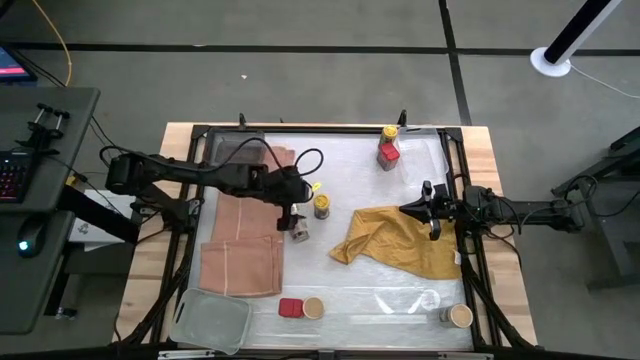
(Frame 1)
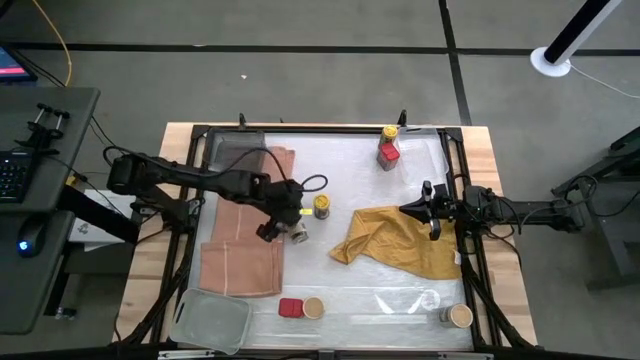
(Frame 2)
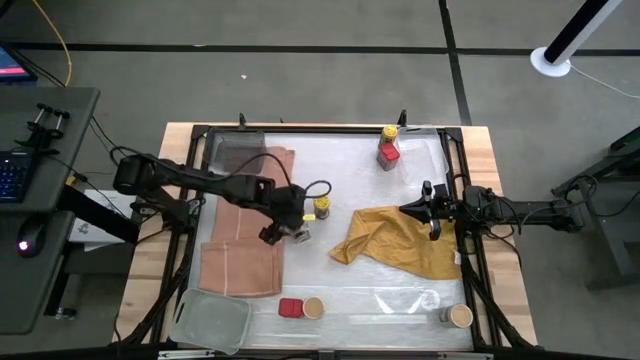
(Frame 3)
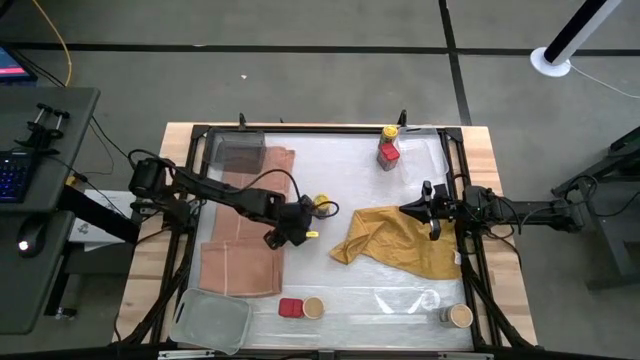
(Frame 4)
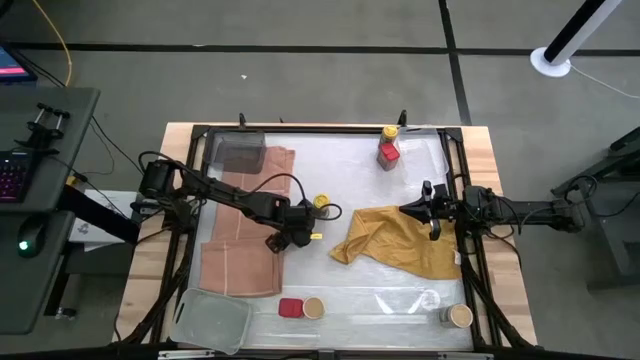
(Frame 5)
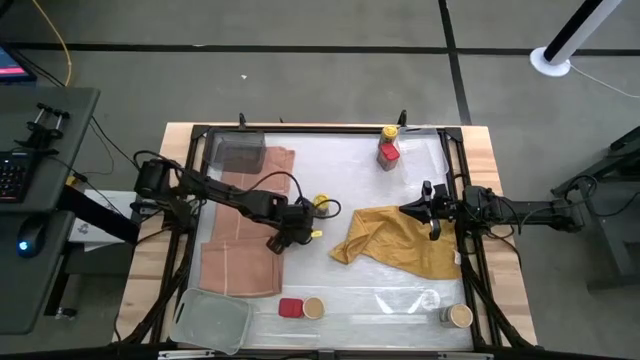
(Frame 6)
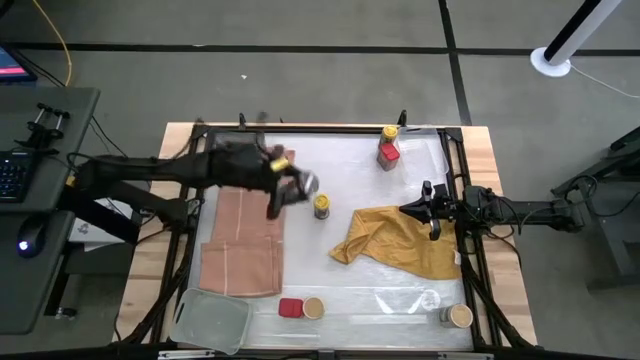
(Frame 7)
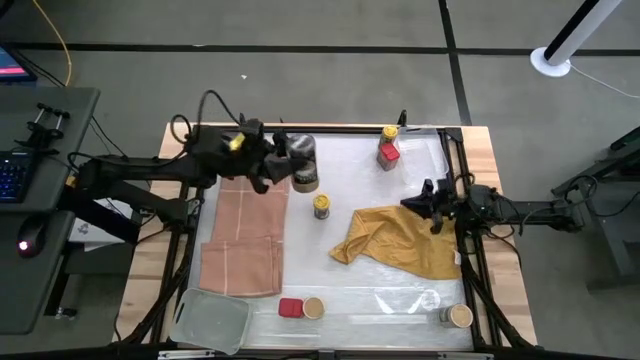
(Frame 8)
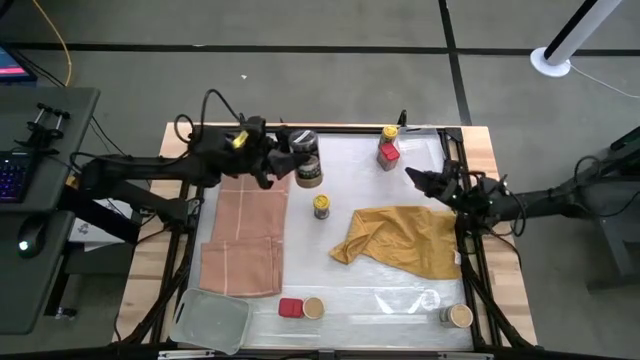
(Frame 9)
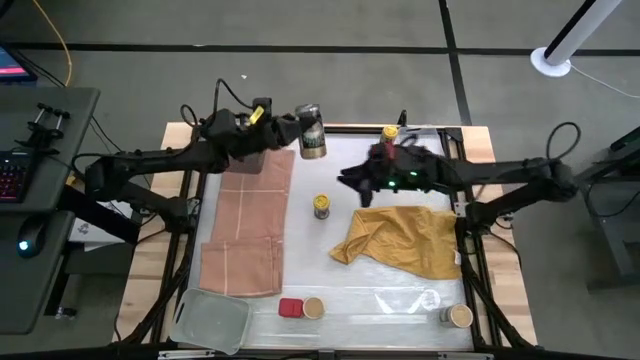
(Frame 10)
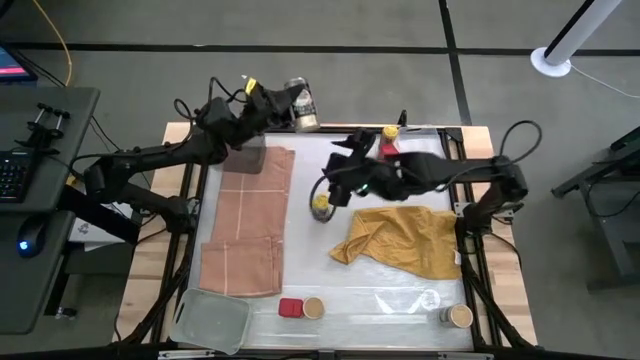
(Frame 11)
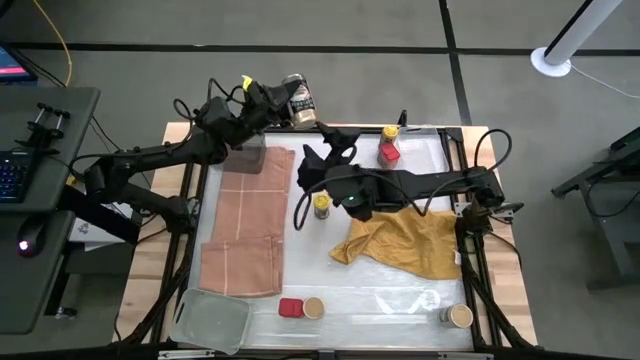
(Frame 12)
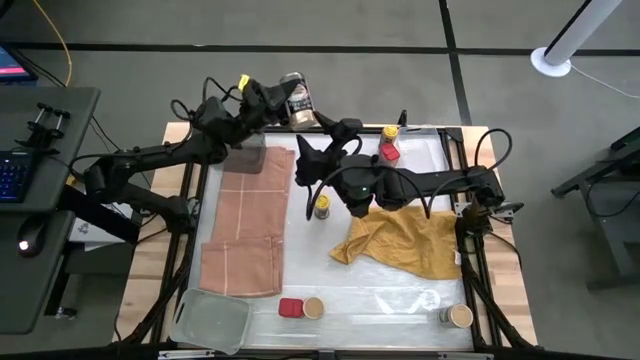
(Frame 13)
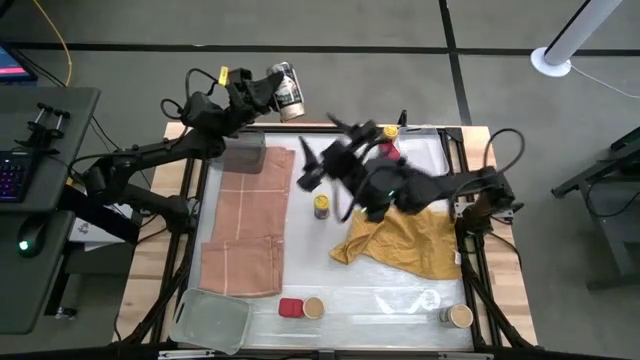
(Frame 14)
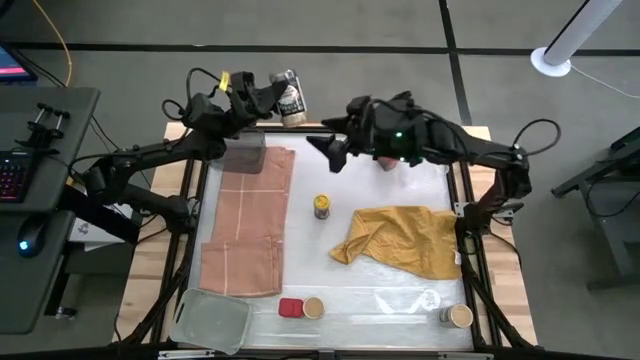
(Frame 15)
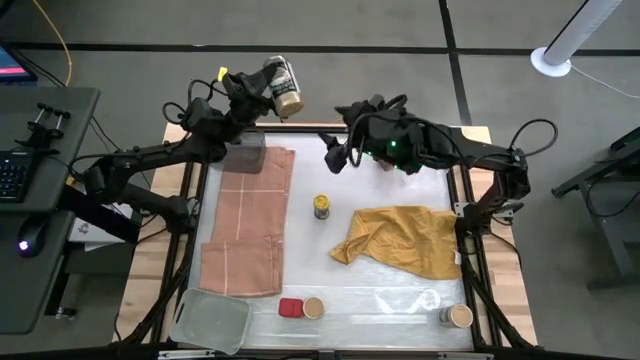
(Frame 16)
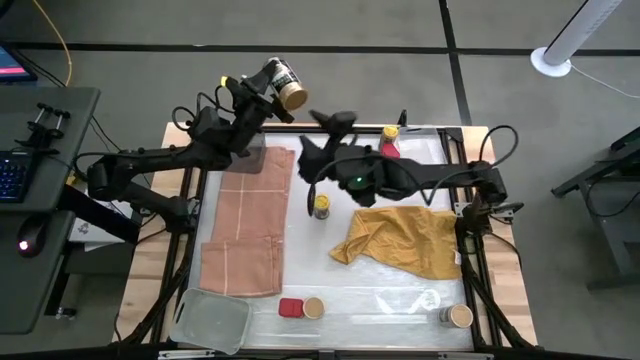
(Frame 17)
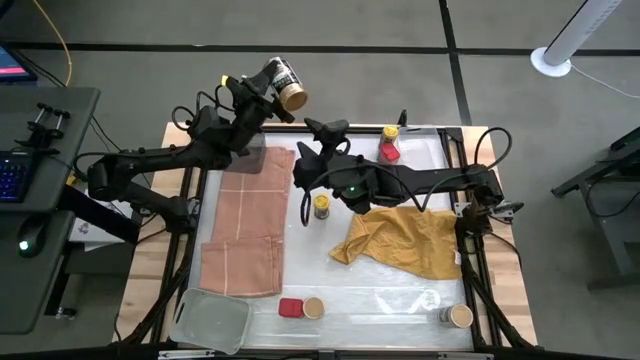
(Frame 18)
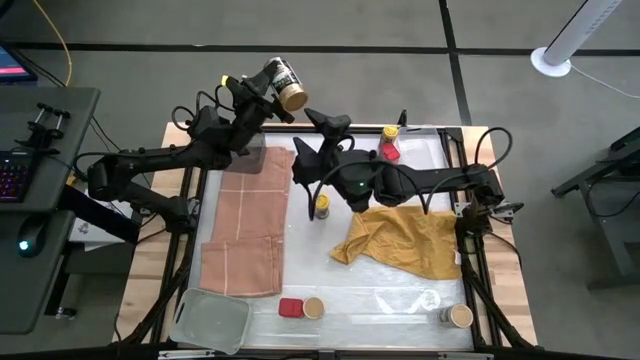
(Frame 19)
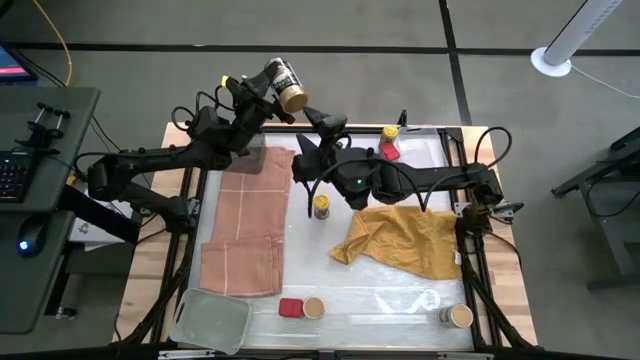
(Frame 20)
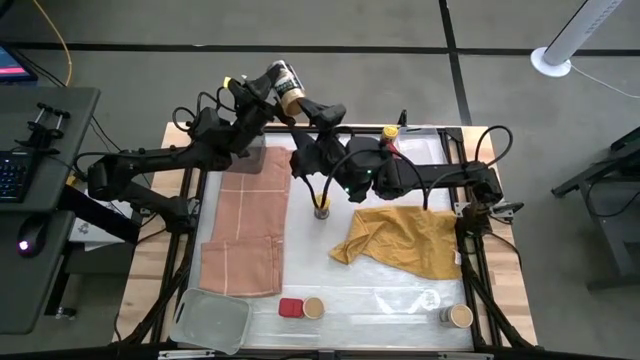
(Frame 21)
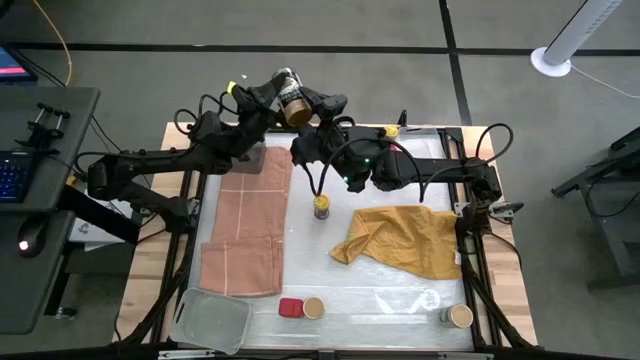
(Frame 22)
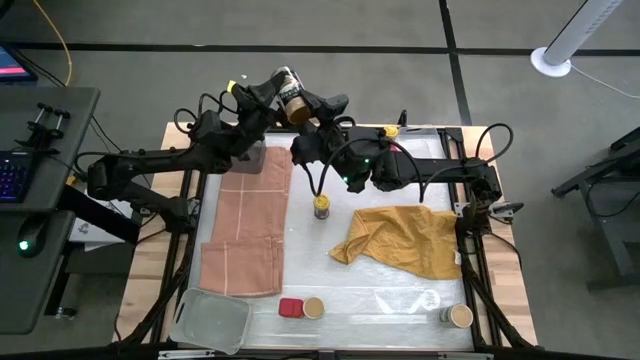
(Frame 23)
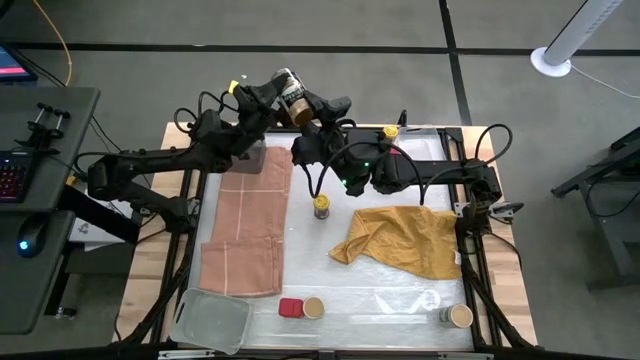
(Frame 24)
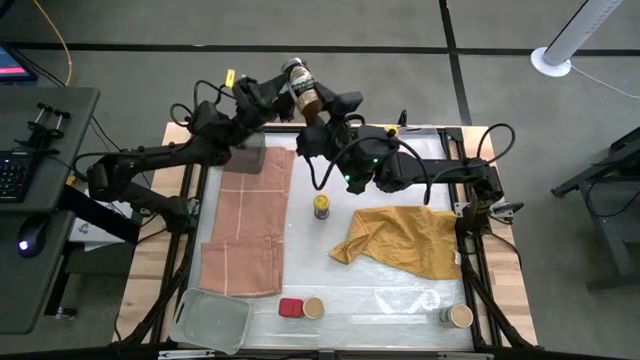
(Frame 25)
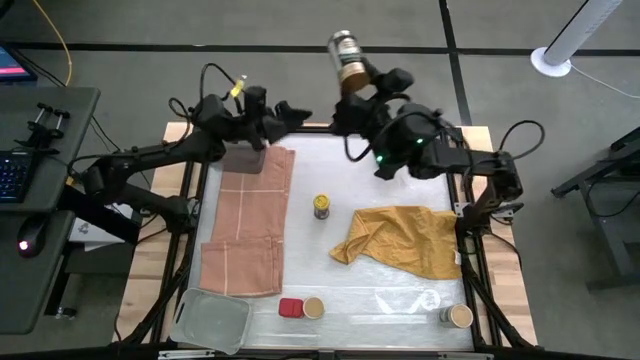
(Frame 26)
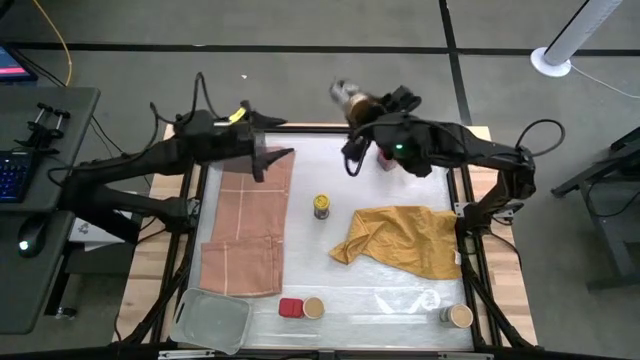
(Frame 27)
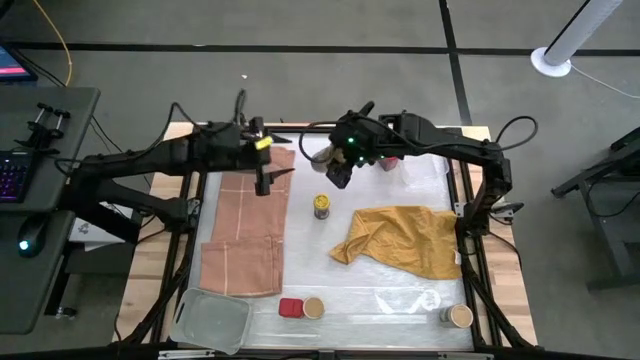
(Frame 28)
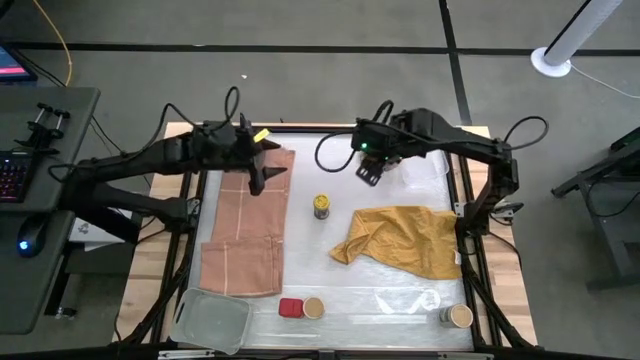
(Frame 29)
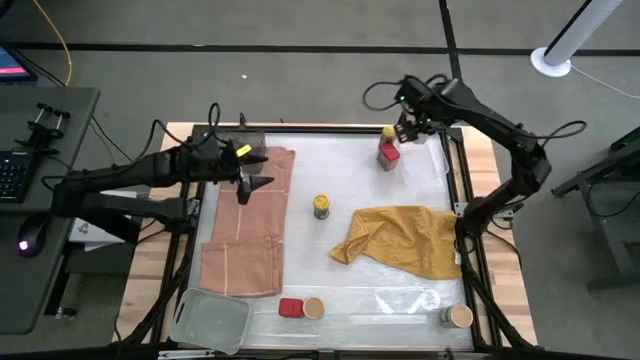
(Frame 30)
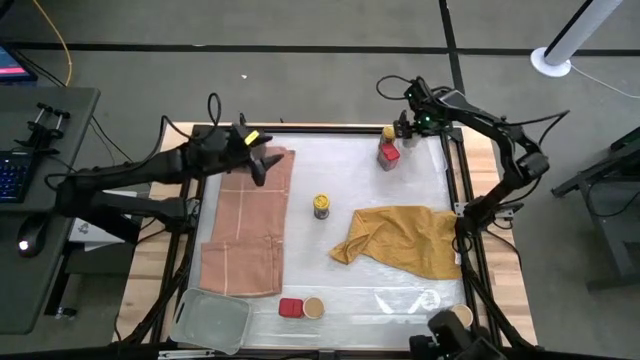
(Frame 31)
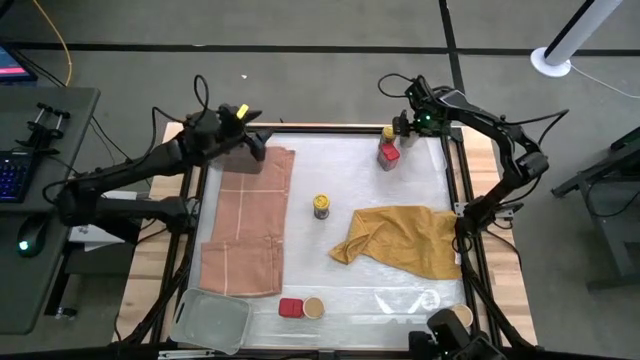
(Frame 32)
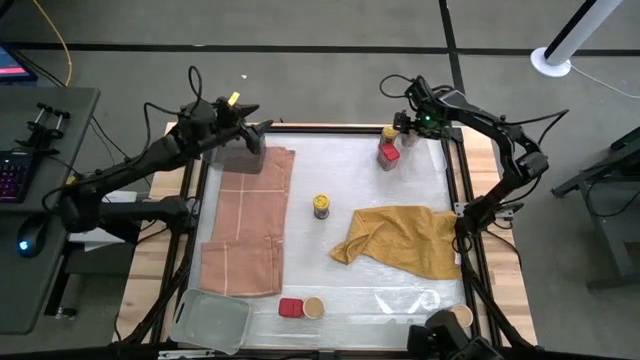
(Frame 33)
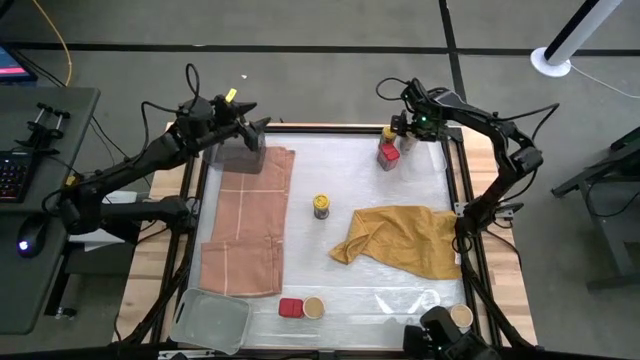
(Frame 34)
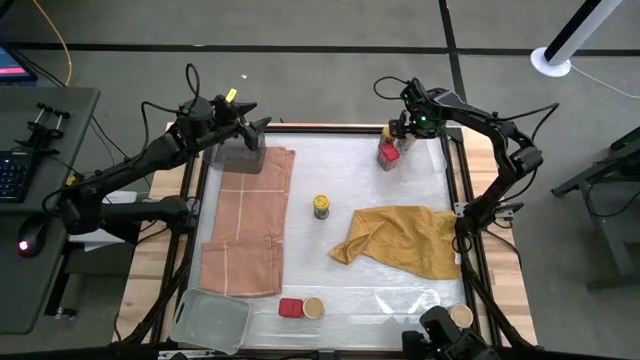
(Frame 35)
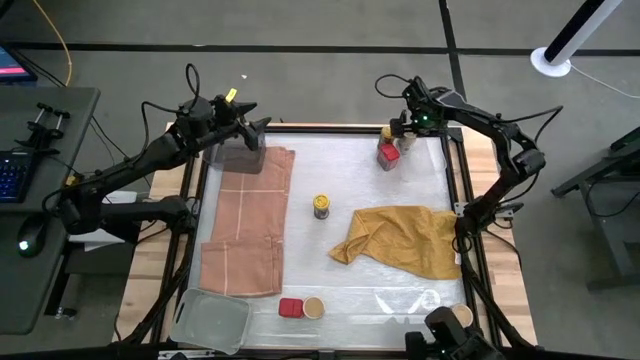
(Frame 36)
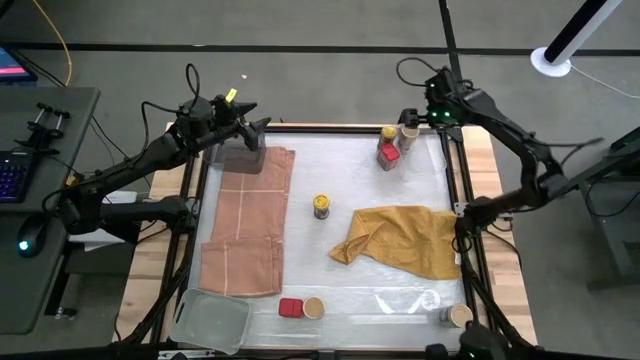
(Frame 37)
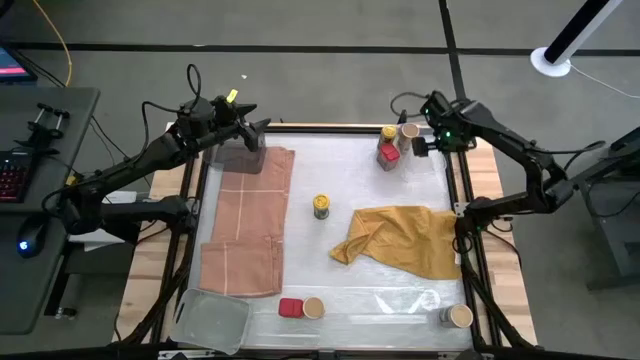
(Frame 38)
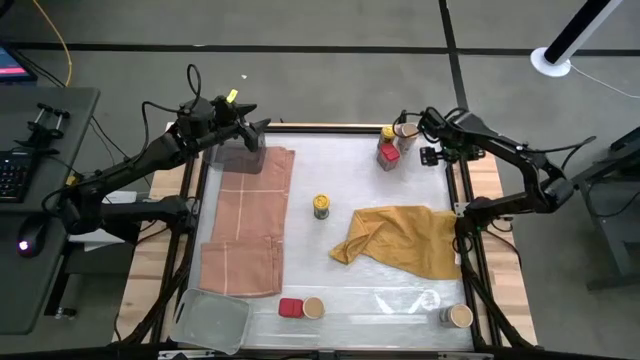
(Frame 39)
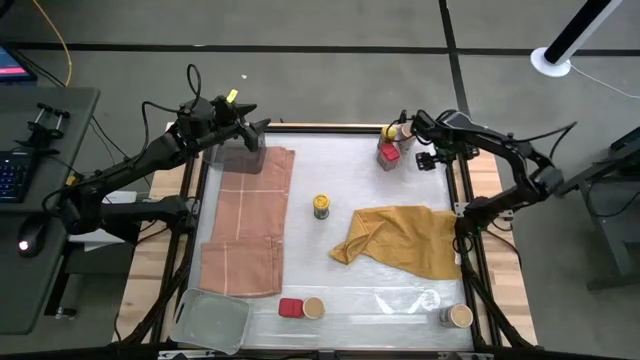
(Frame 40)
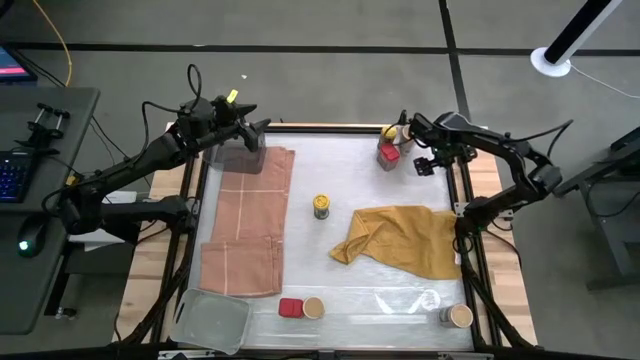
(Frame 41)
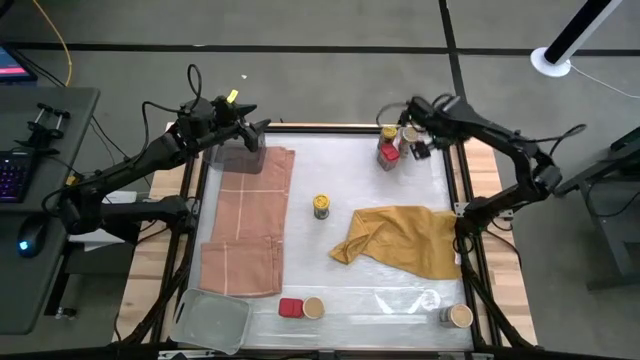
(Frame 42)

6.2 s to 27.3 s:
Task: Sort spices by type
Put the top gold seasoning bottle into the transparent bin
